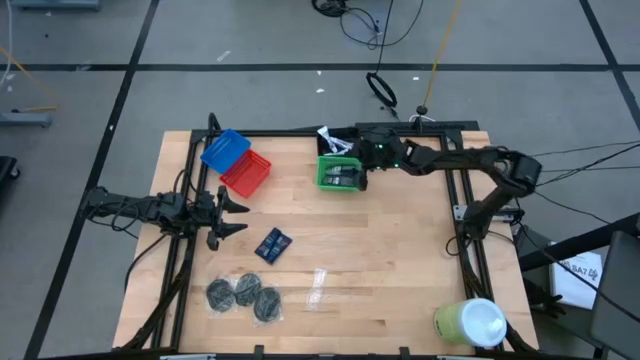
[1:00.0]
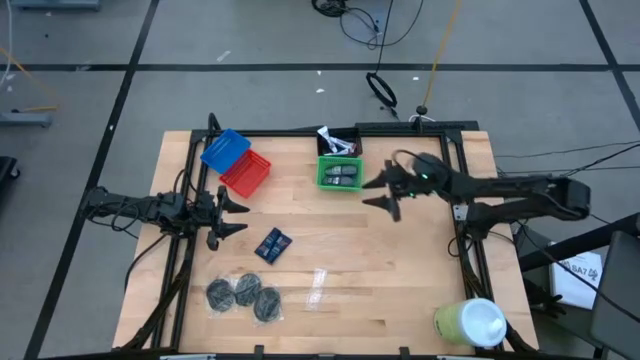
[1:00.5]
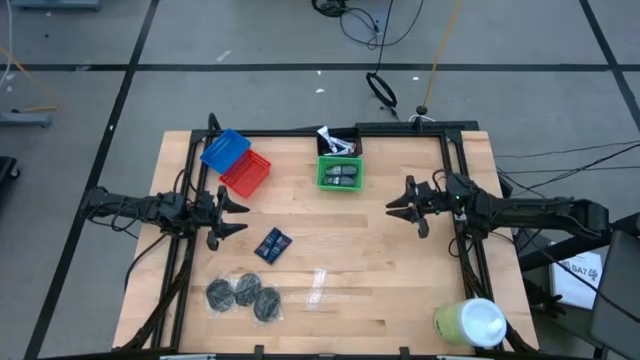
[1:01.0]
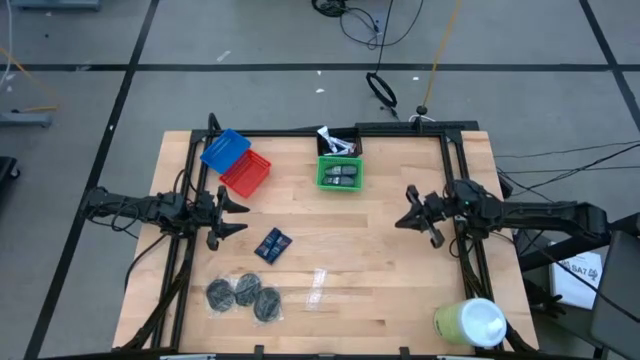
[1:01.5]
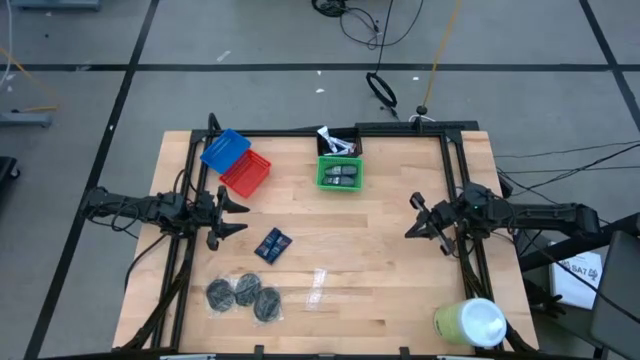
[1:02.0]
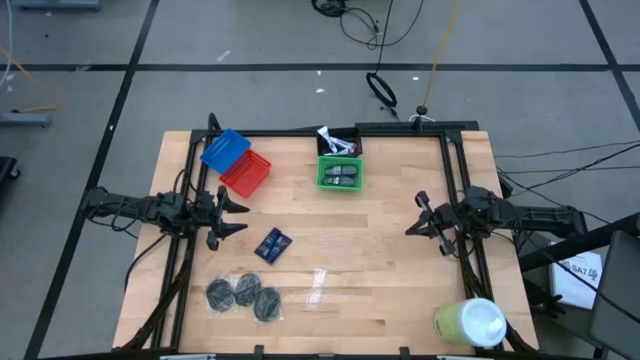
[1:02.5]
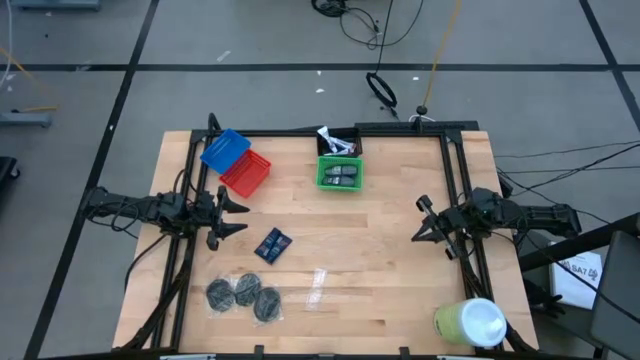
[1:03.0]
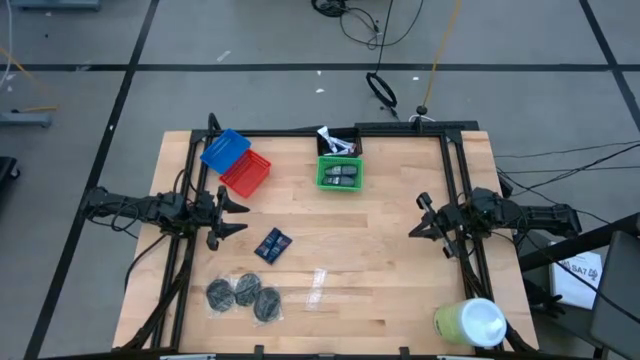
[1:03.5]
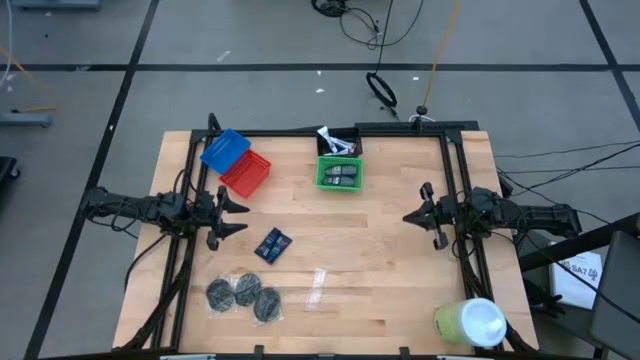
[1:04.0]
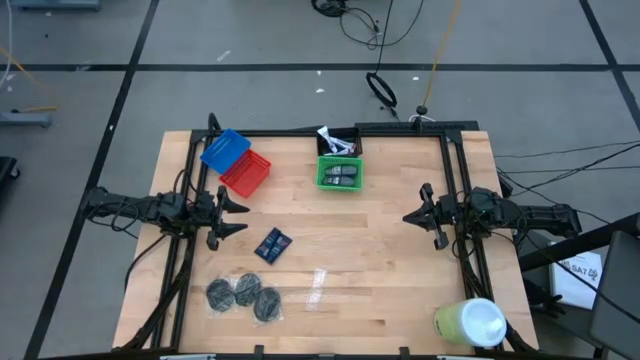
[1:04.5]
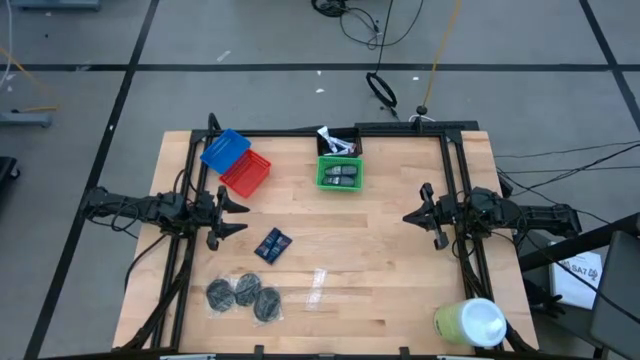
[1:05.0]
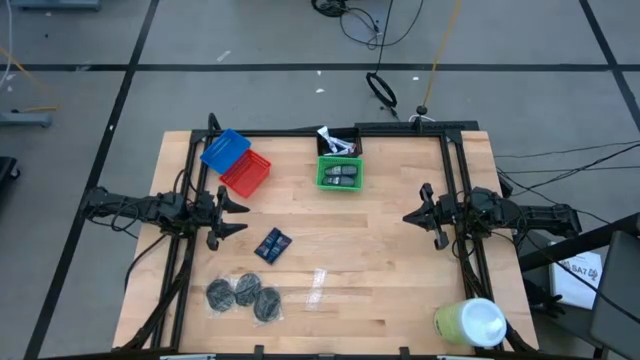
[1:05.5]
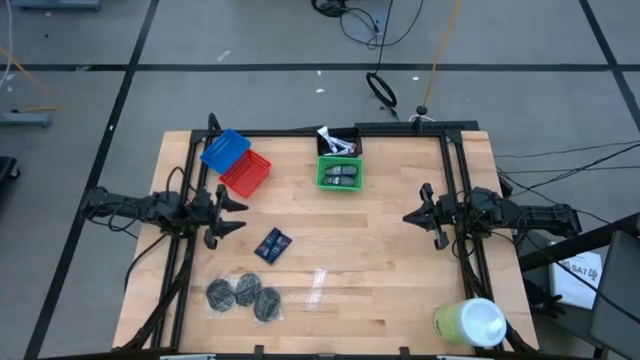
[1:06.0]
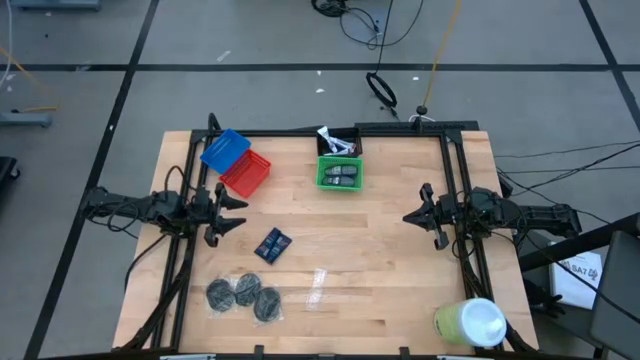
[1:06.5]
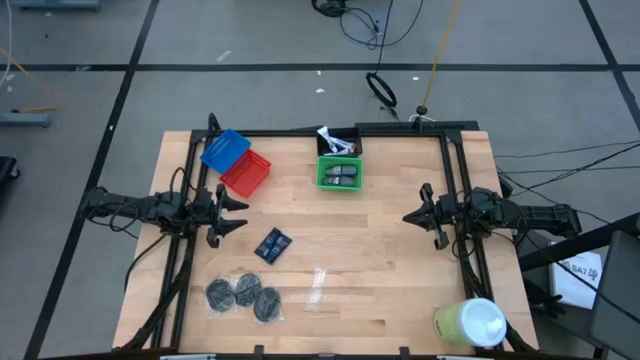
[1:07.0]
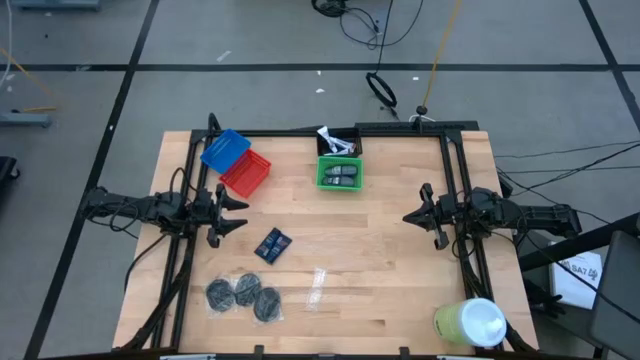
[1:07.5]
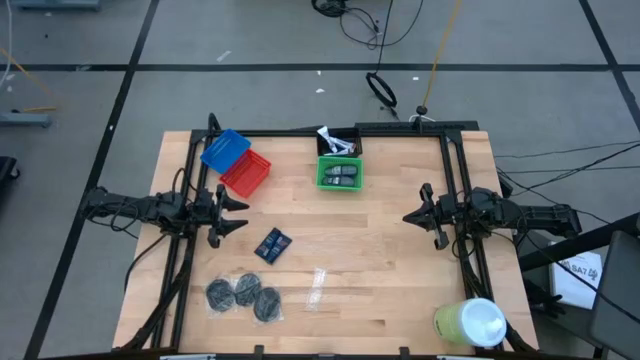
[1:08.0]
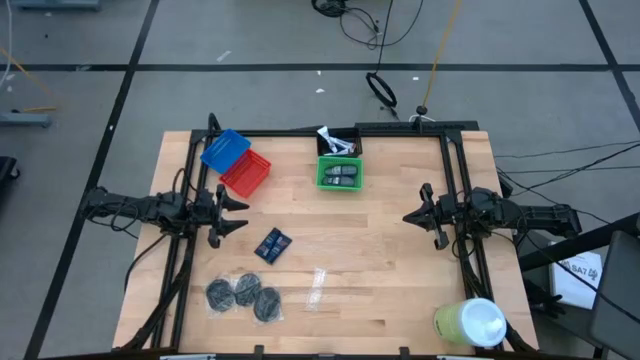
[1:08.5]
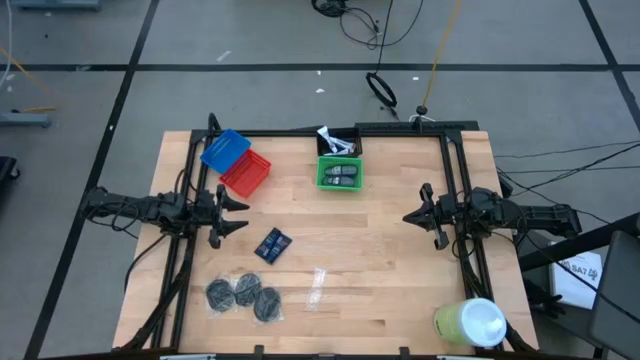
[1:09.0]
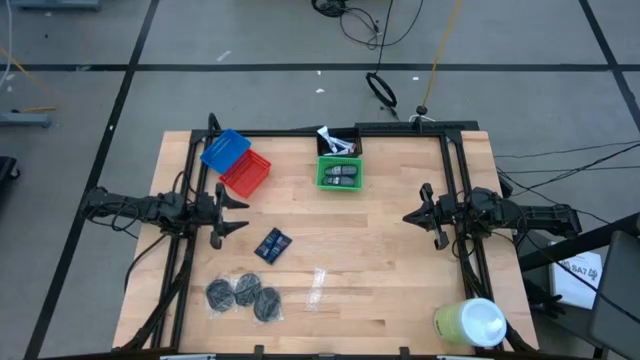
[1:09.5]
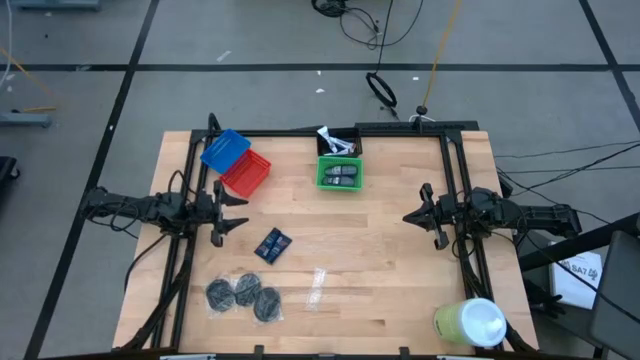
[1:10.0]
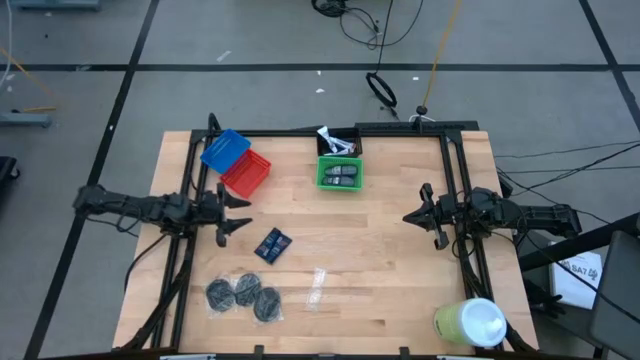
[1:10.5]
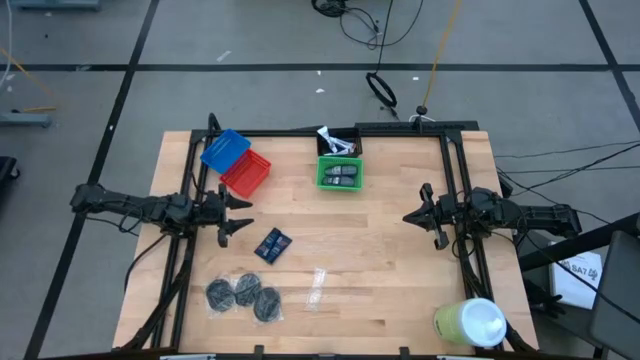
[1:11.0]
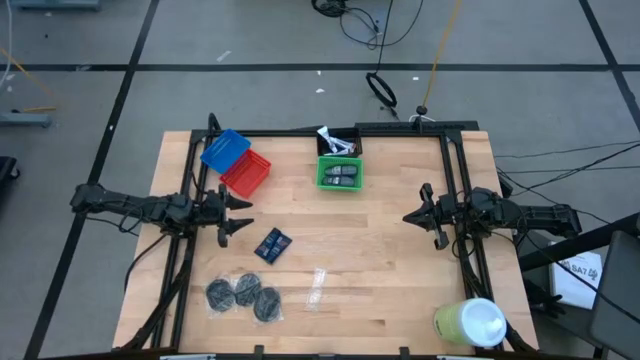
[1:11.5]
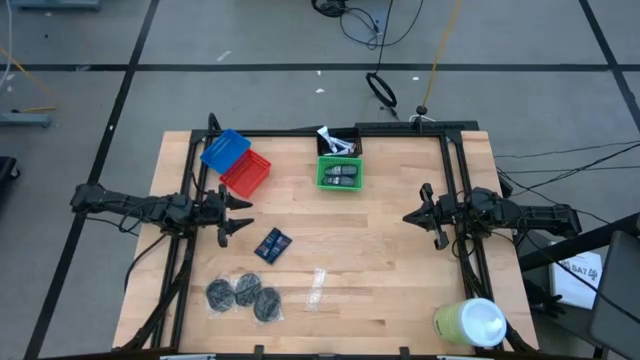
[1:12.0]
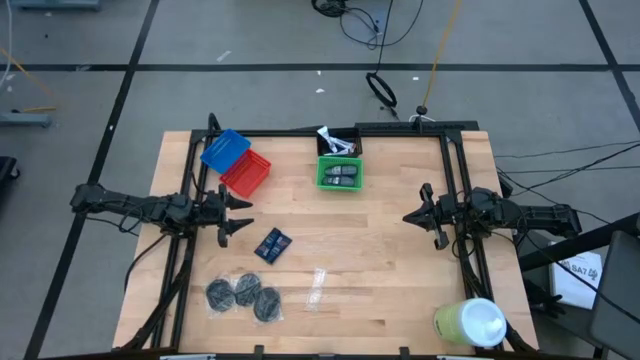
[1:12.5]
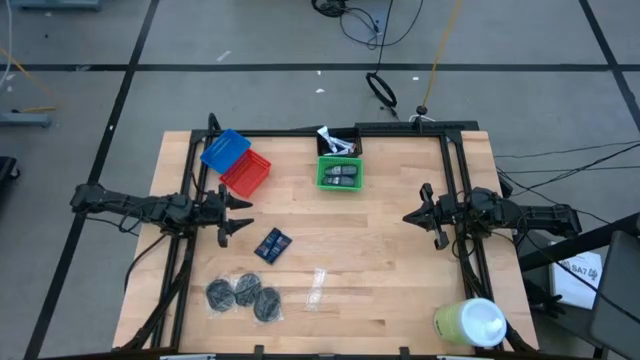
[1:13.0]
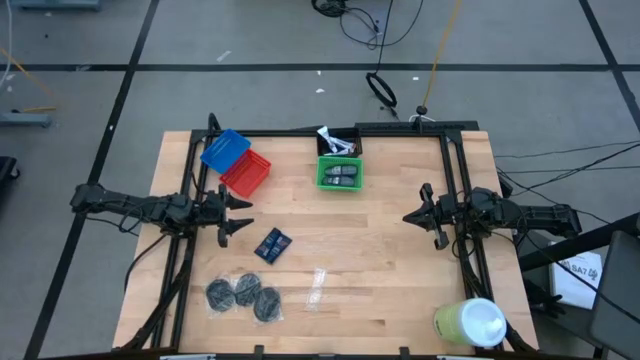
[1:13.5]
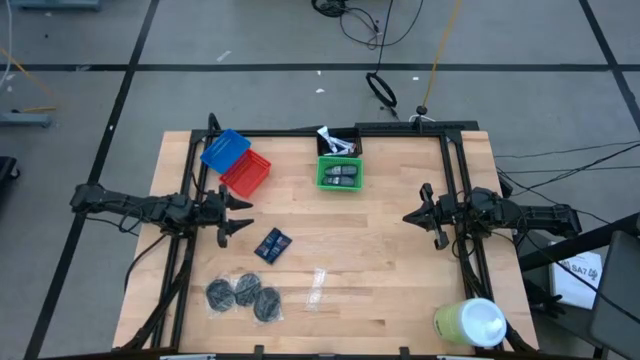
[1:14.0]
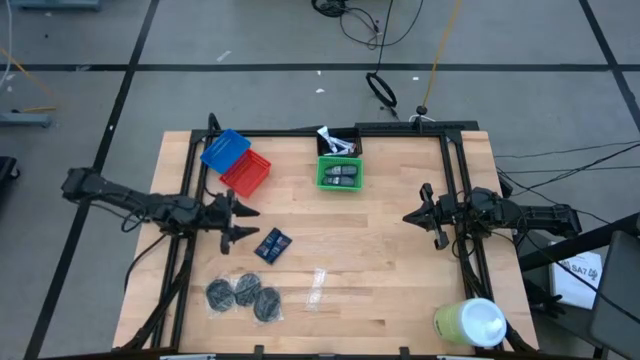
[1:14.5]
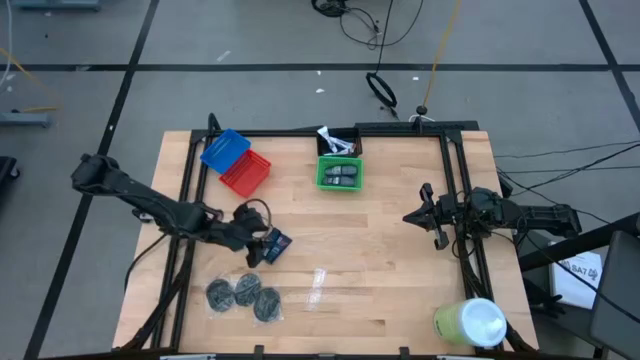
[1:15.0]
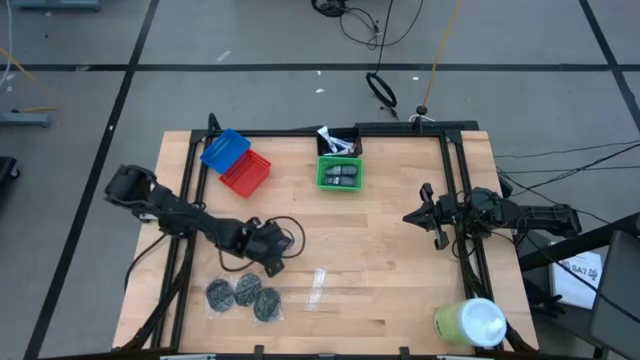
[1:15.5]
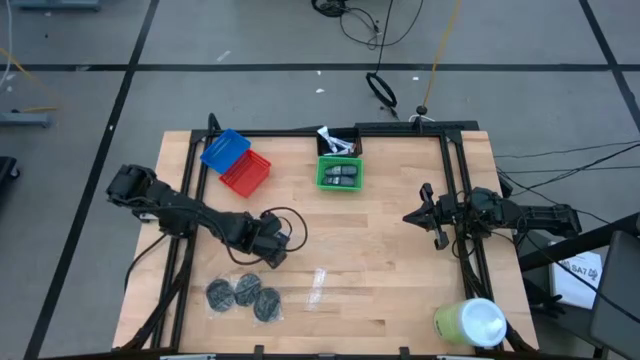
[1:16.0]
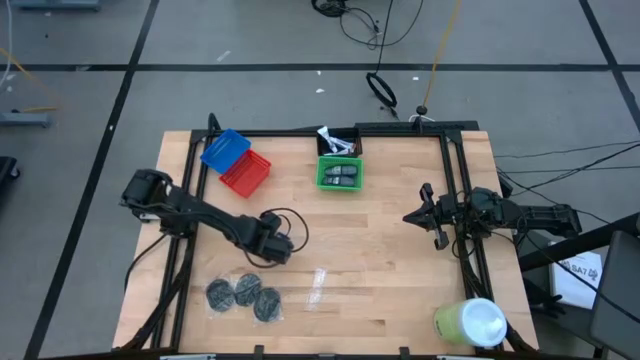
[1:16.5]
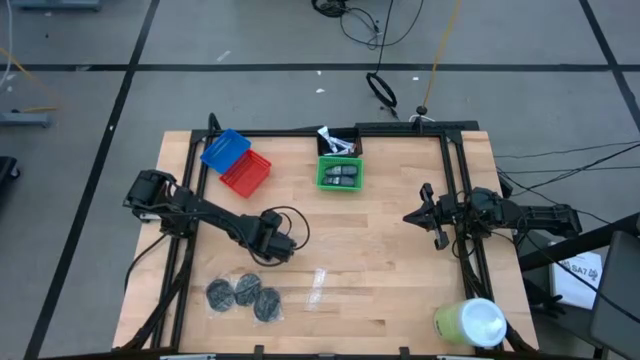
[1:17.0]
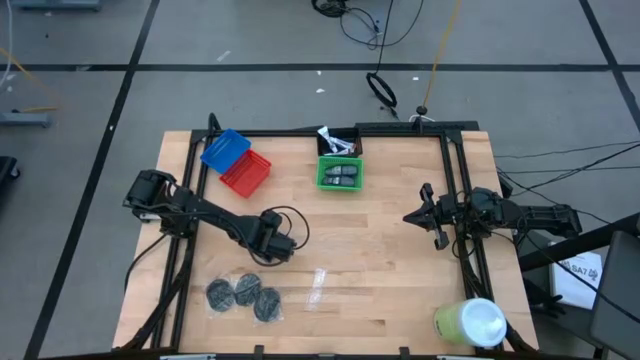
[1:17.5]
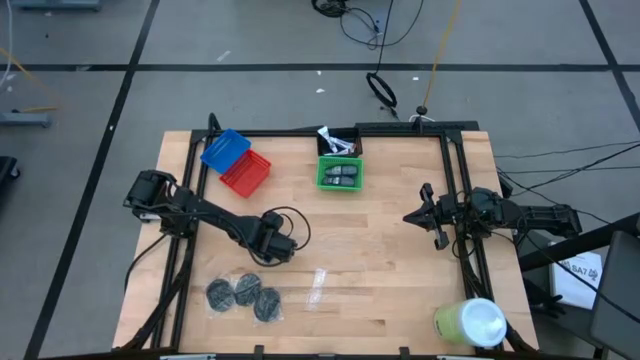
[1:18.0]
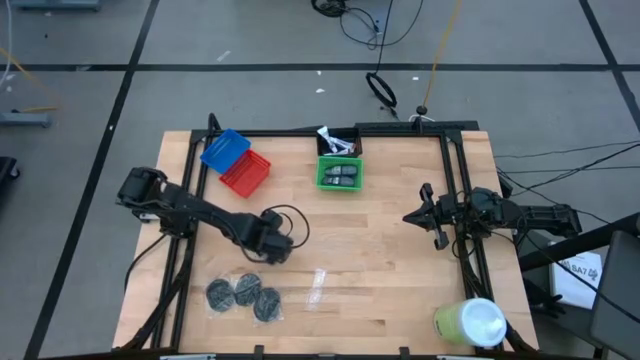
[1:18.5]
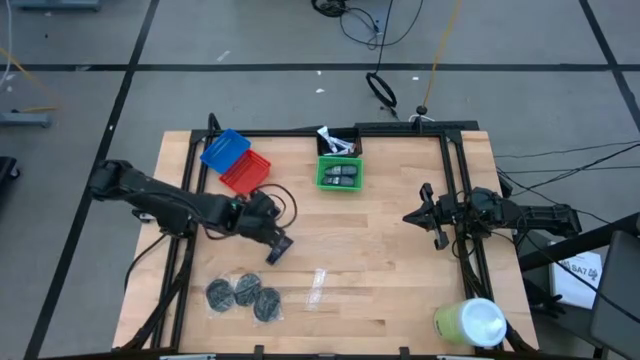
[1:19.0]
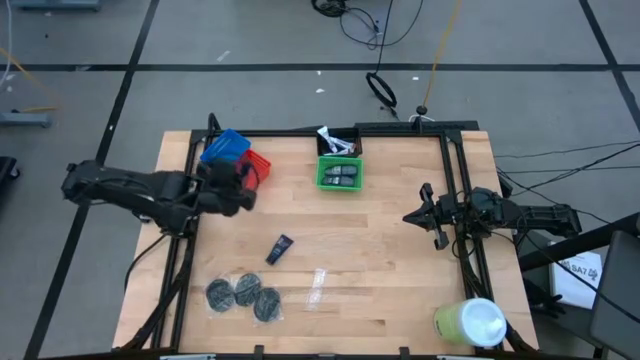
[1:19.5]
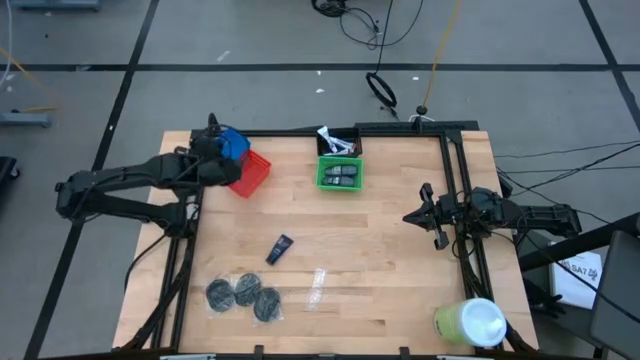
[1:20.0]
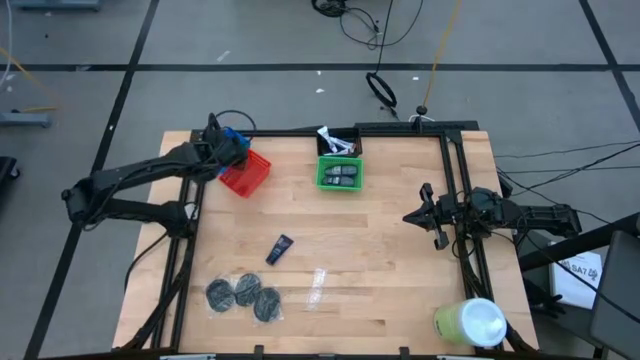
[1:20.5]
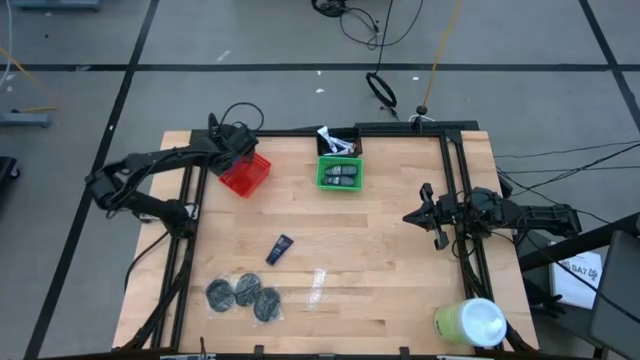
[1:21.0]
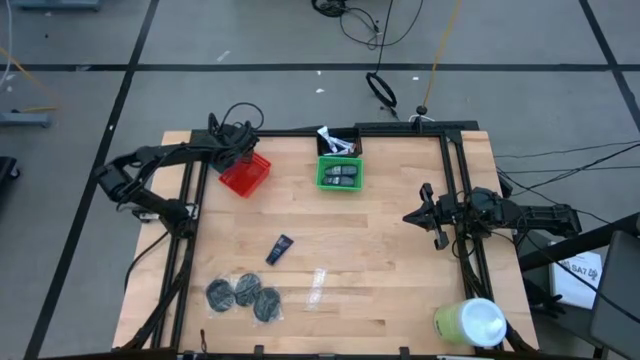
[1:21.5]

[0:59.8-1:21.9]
Task: Pick & Place Travel size toiletries
Put the top blue shaving cream into the blue bin

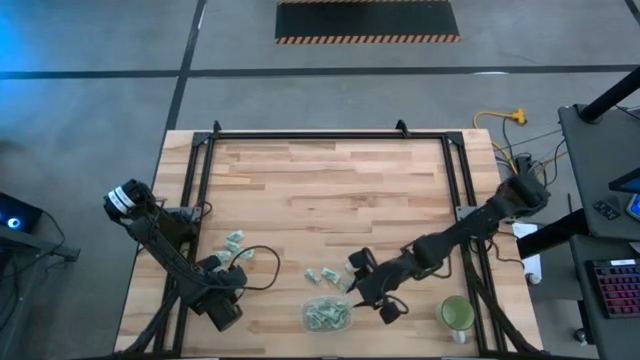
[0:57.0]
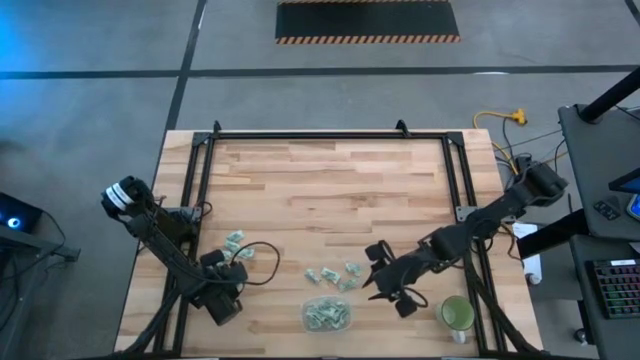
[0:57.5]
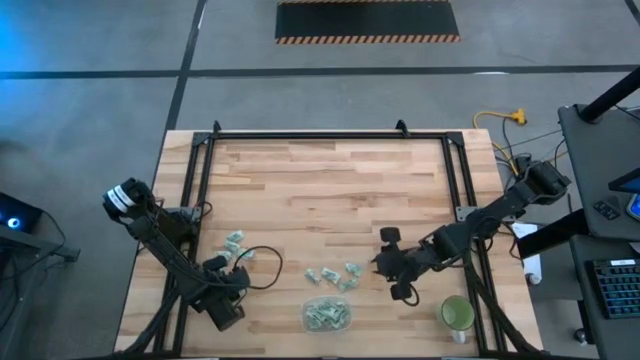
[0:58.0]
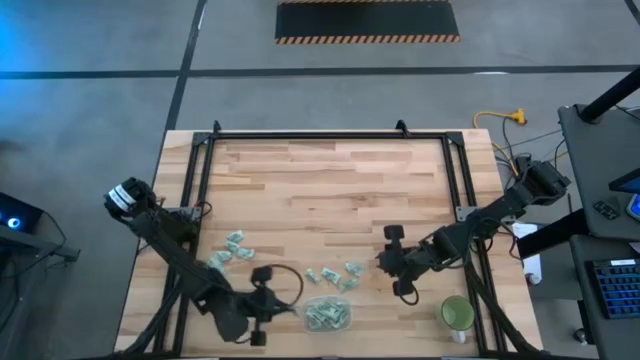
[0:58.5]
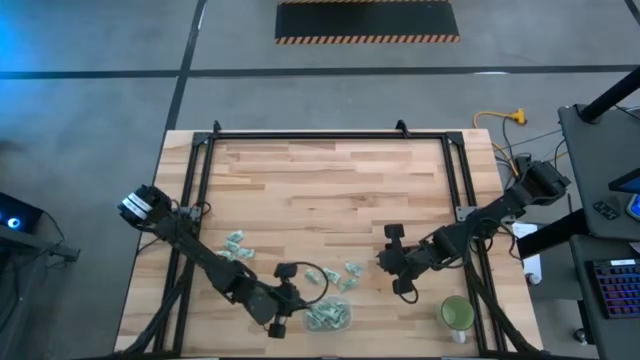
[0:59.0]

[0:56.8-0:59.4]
Task: Pick and place Stevia / Truvia into bins
Put the stevia packet into the transparent container
